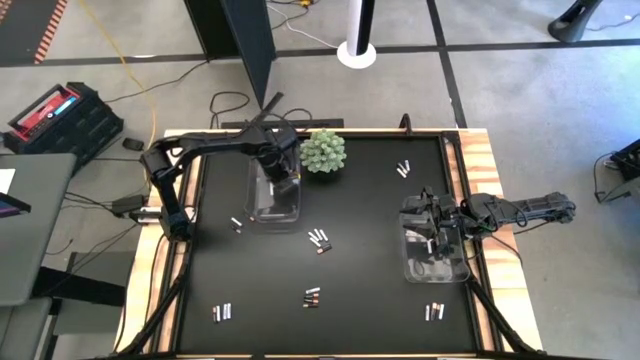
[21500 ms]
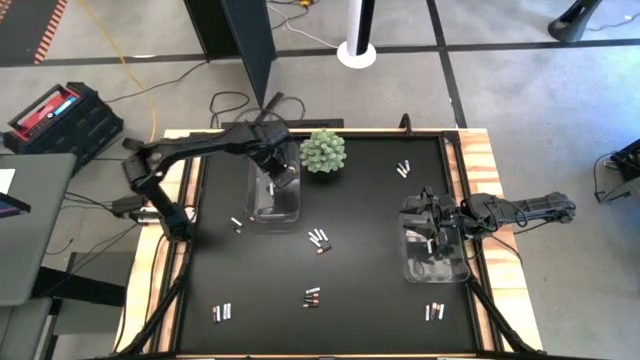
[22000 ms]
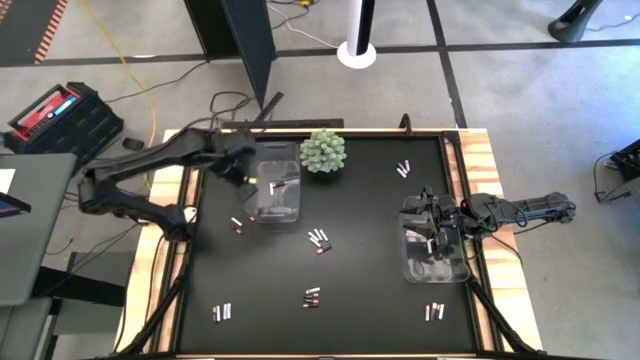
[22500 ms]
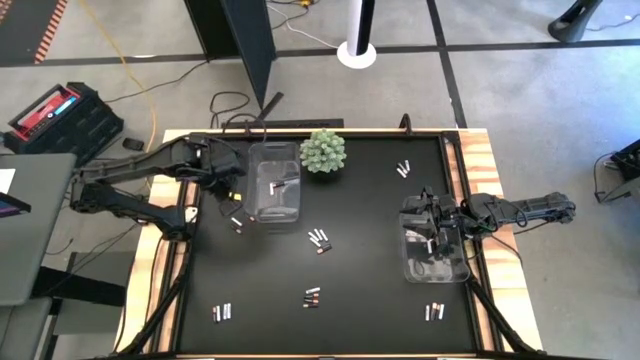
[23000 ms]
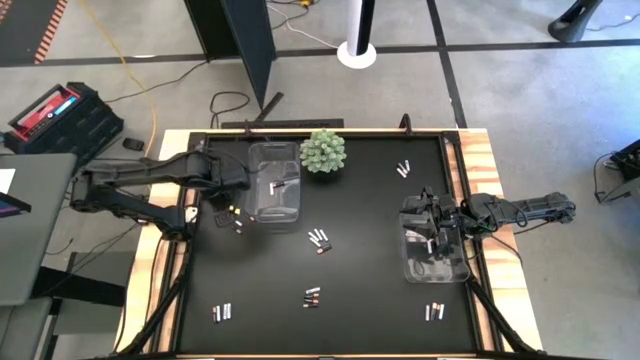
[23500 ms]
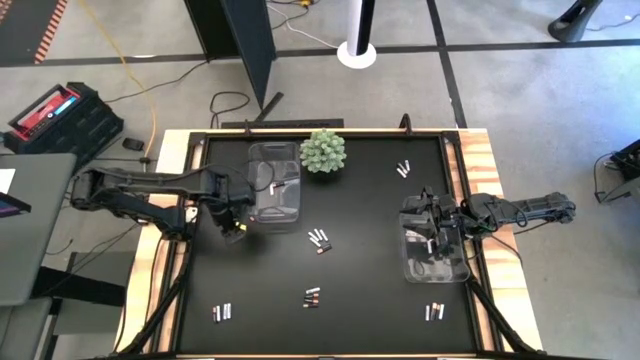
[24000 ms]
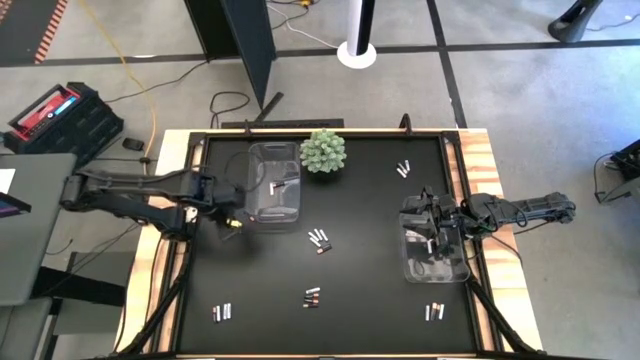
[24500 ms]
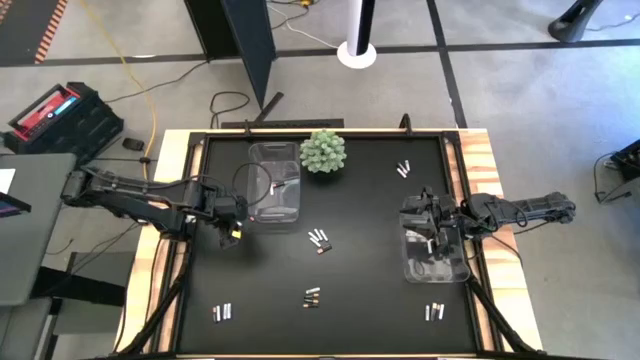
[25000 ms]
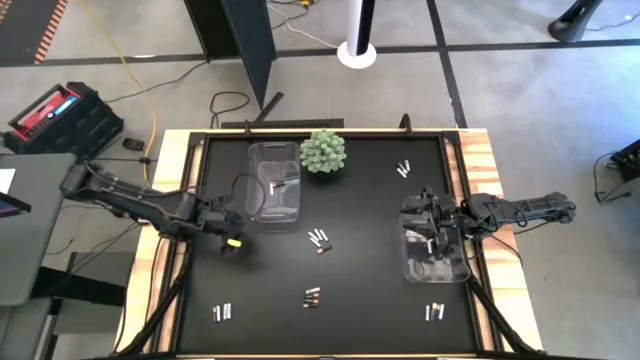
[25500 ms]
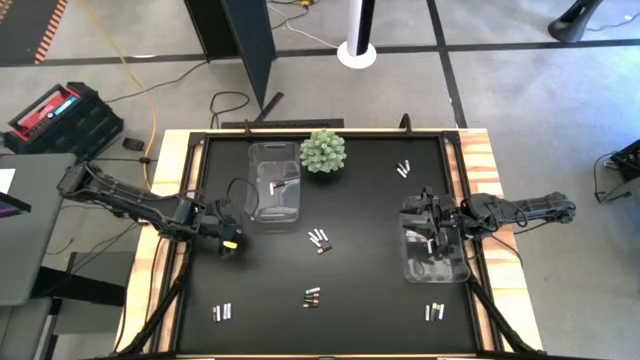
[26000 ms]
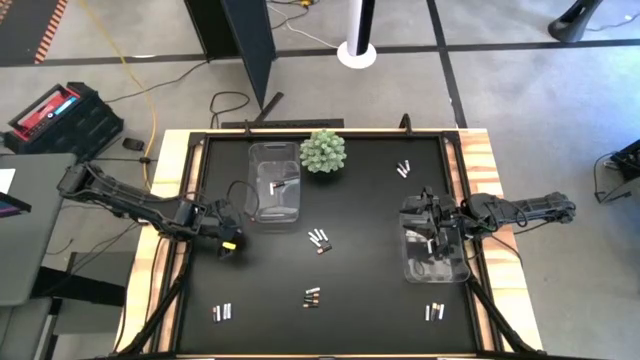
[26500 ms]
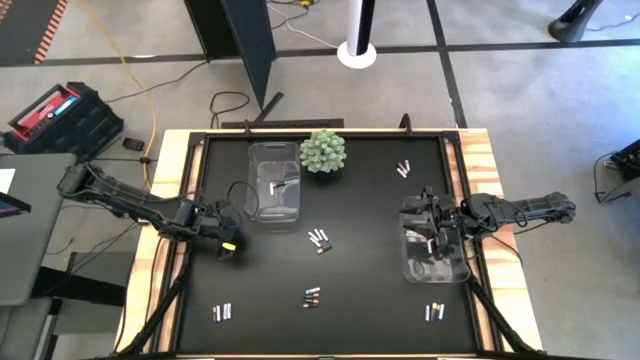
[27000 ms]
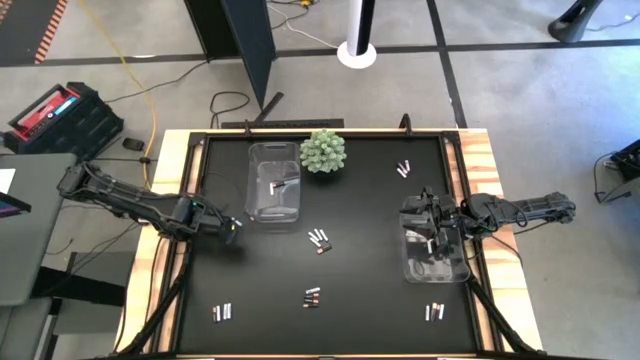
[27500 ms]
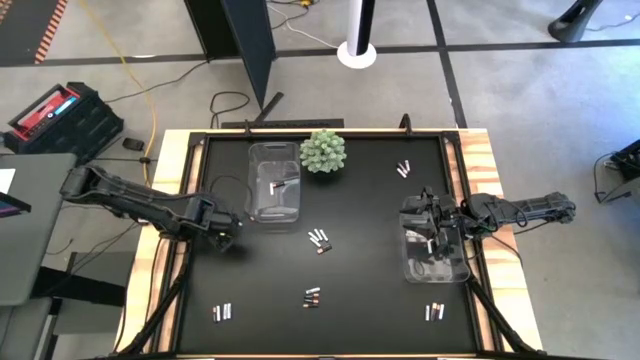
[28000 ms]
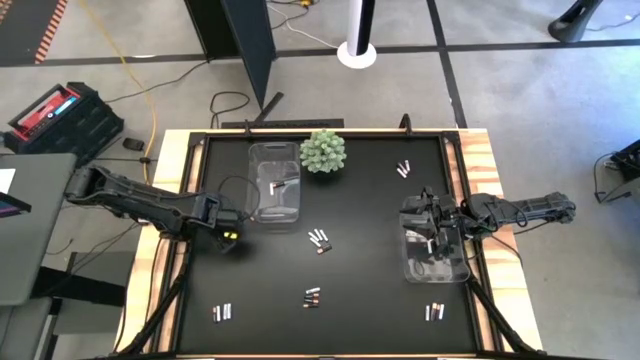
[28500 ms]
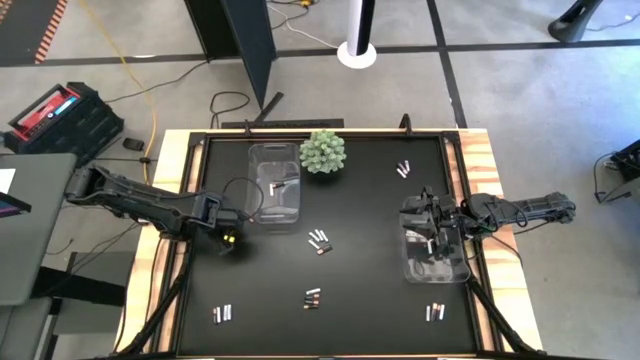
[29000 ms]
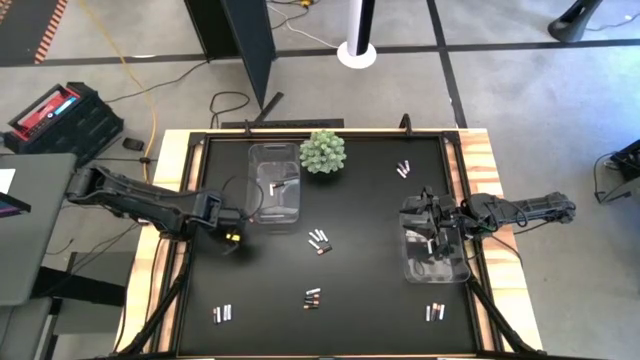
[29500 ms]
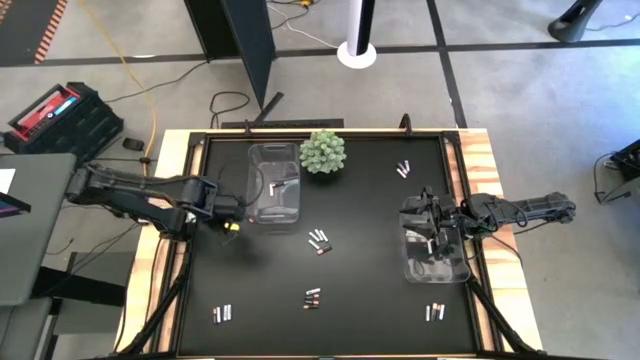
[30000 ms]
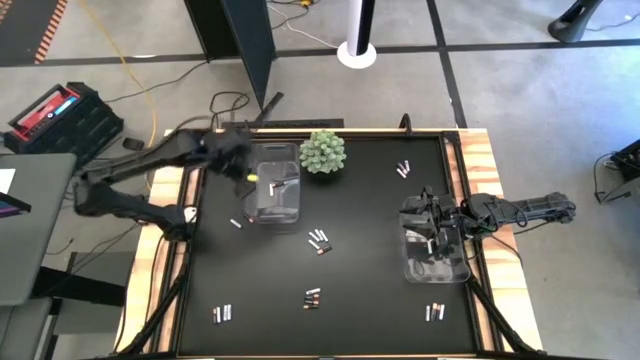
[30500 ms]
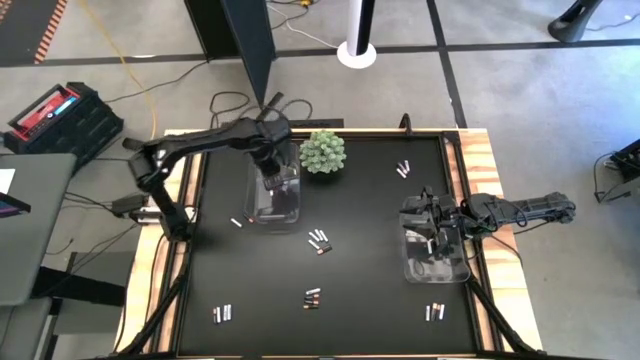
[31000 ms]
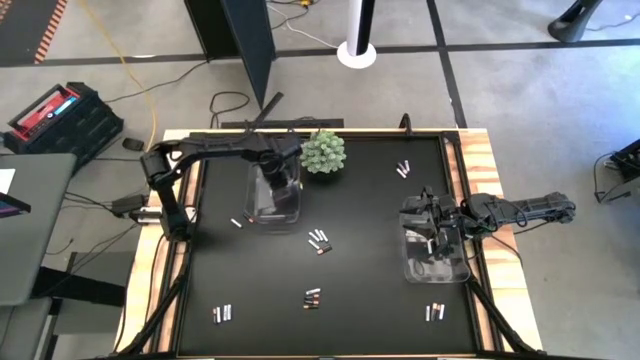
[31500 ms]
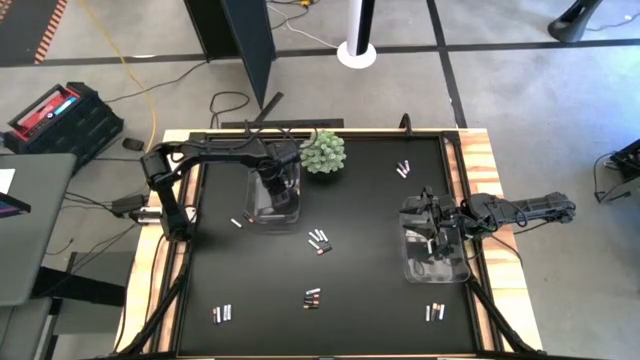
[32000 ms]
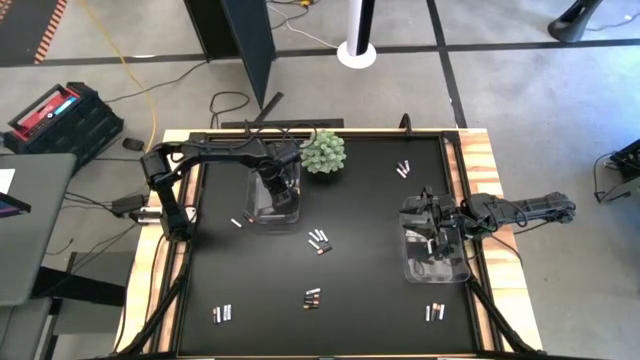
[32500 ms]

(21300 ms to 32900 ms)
Task: Sort batteries
Put the black-brown battery into the left transparent bin

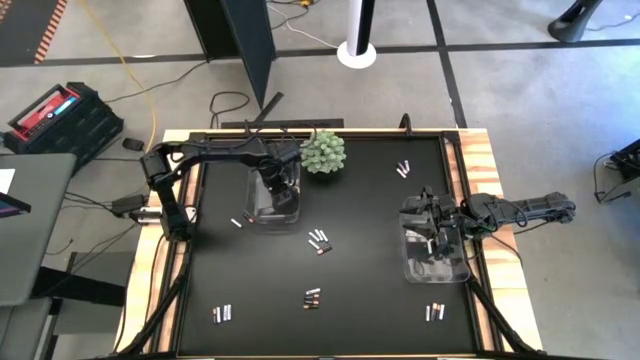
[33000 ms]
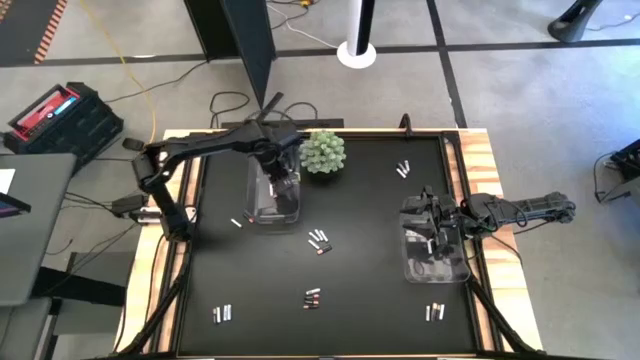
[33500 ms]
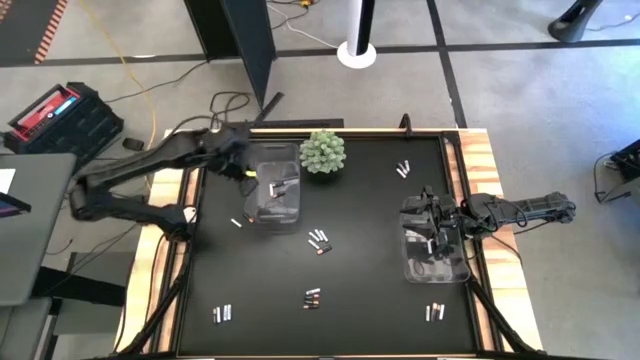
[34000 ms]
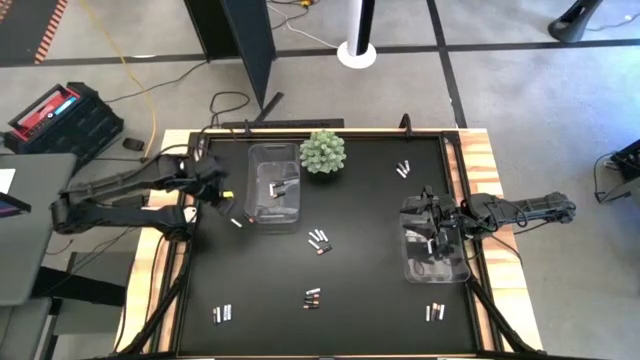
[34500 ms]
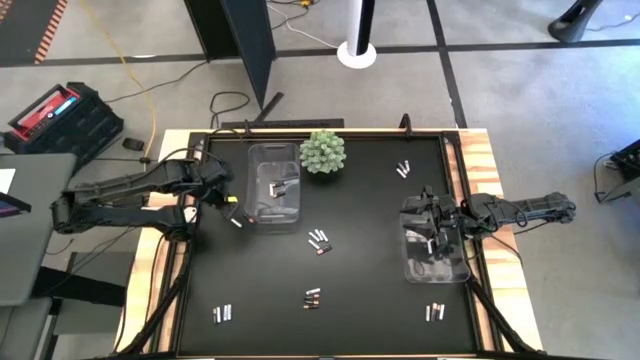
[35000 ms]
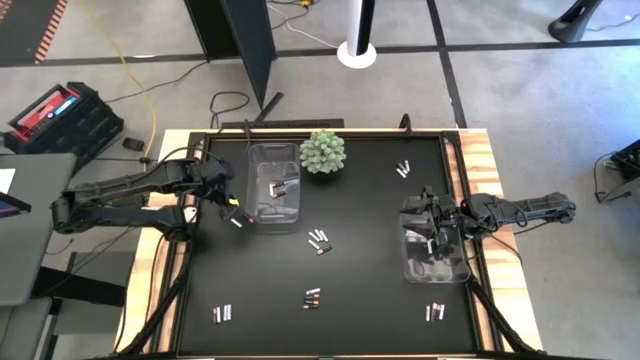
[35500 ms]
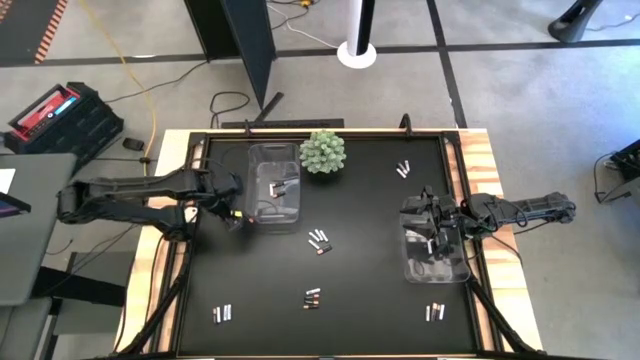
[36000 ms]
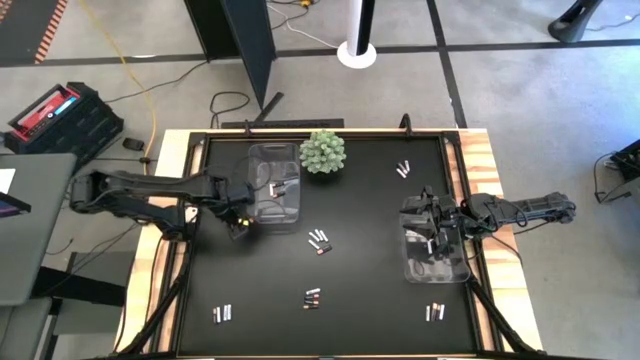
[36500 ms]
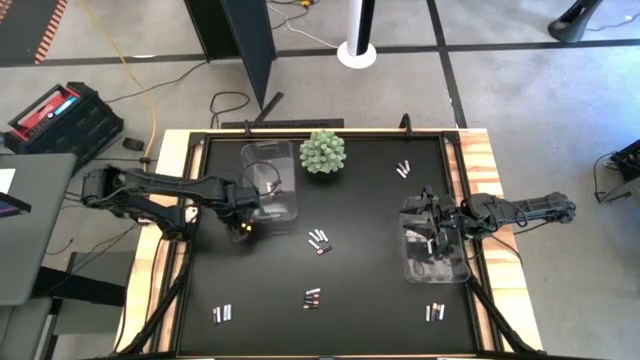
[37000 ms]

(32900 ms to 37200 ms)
Put the white-blue battery into the right transparent bin

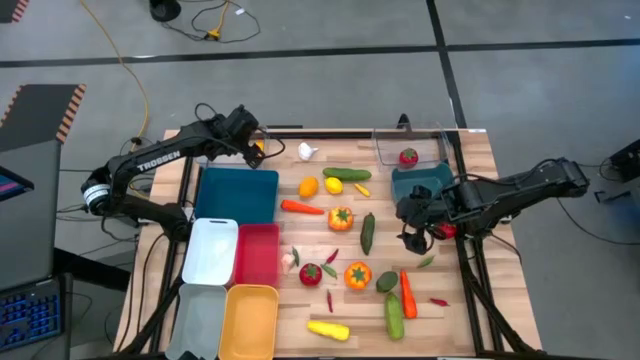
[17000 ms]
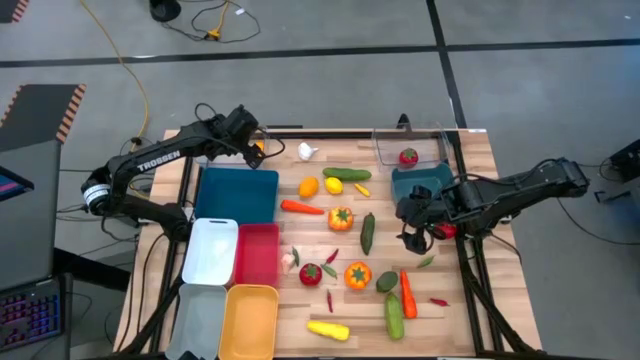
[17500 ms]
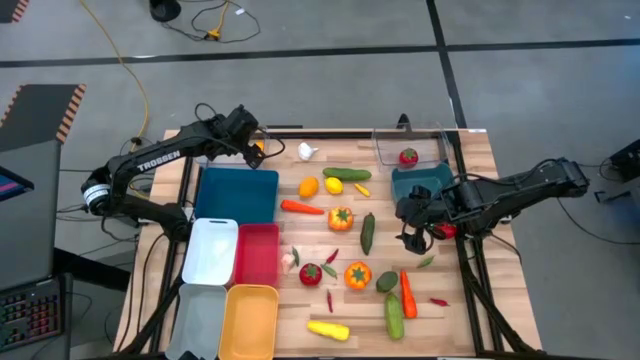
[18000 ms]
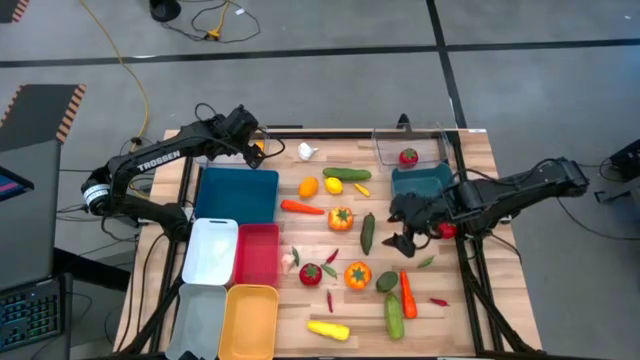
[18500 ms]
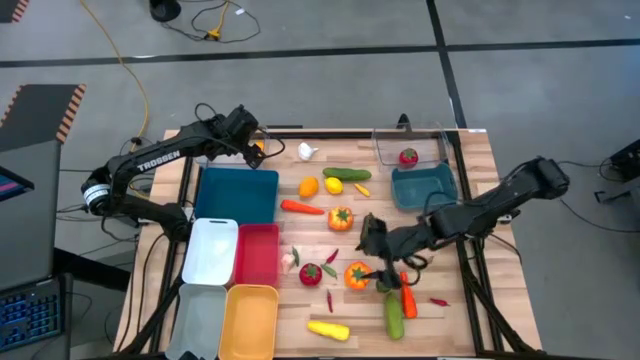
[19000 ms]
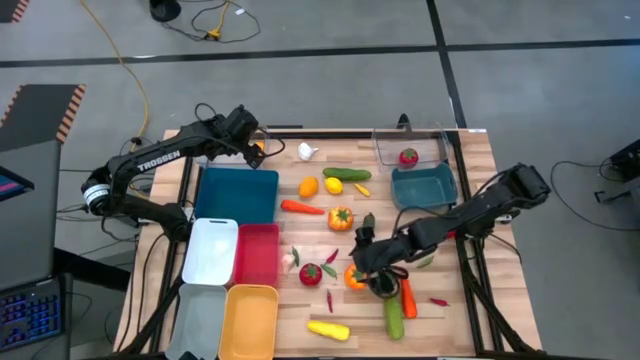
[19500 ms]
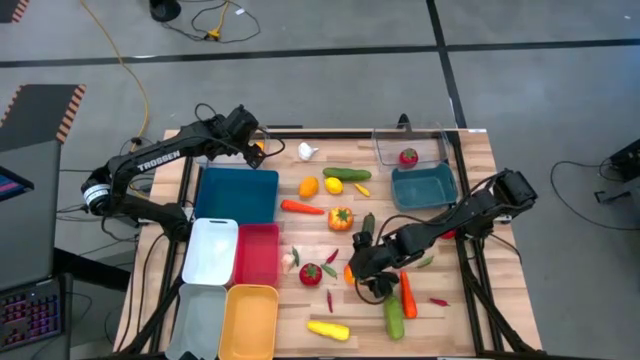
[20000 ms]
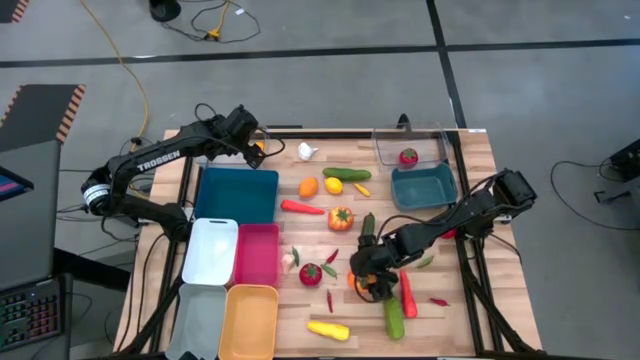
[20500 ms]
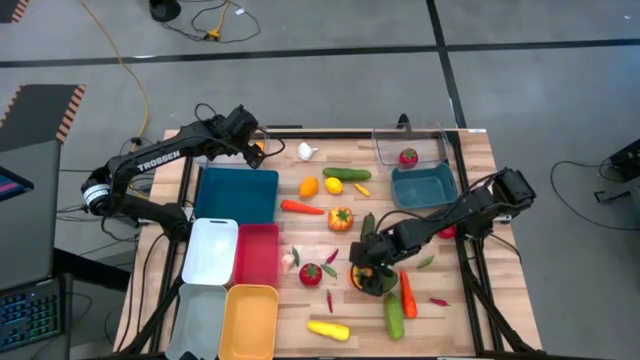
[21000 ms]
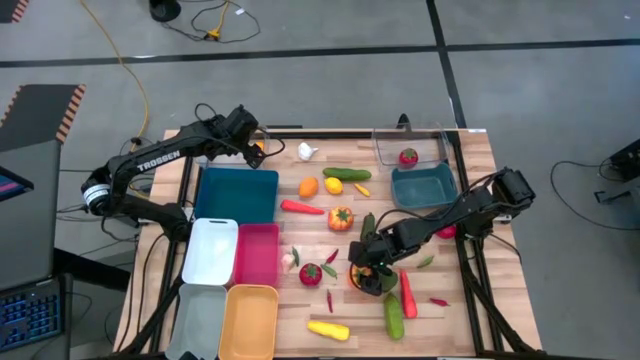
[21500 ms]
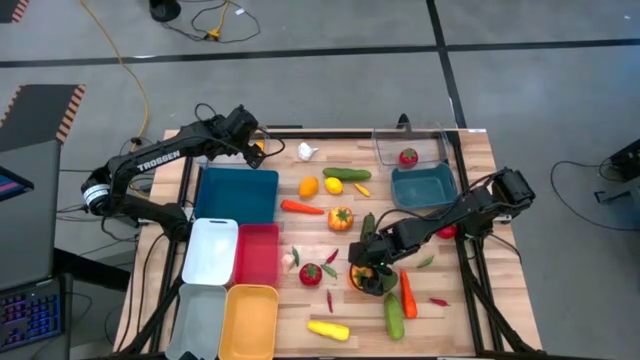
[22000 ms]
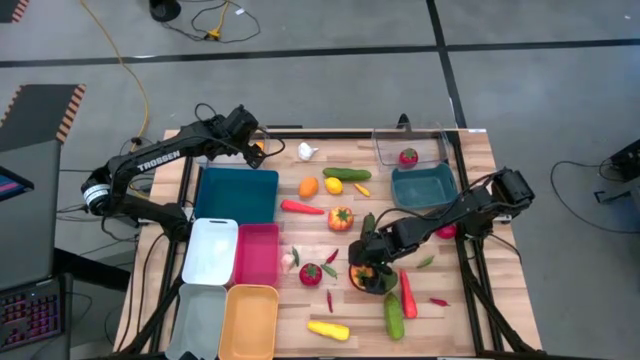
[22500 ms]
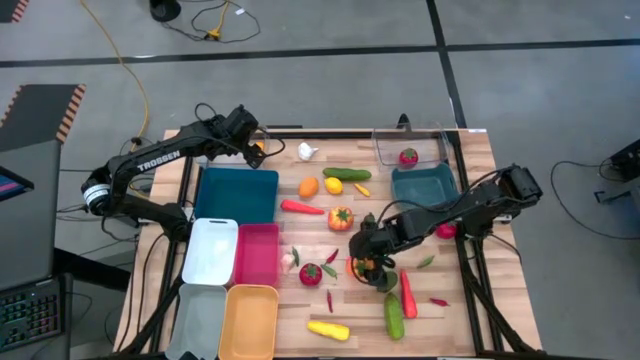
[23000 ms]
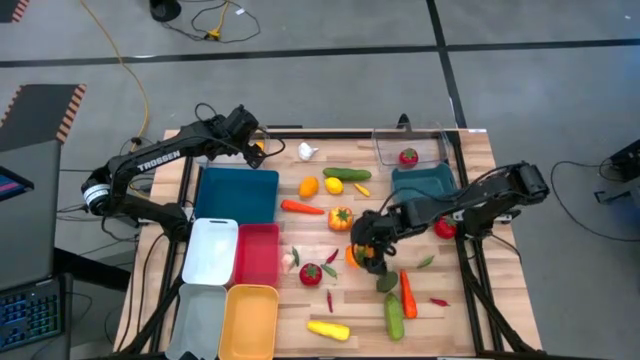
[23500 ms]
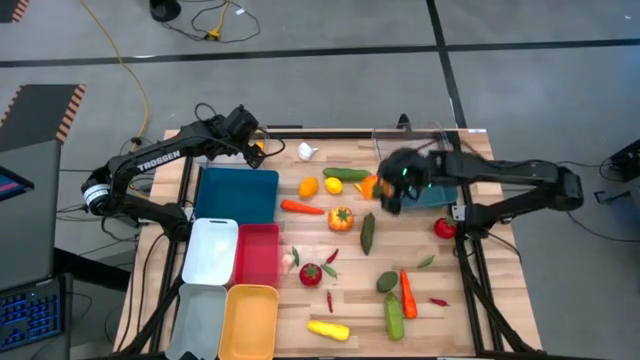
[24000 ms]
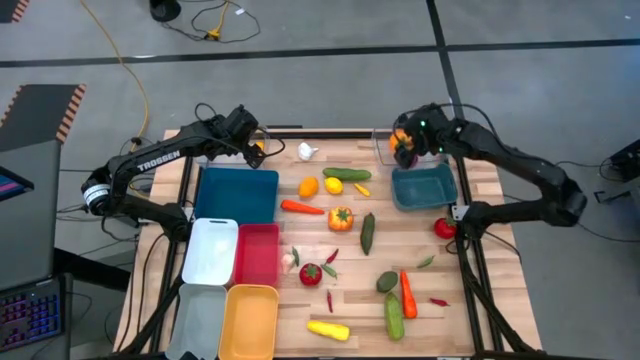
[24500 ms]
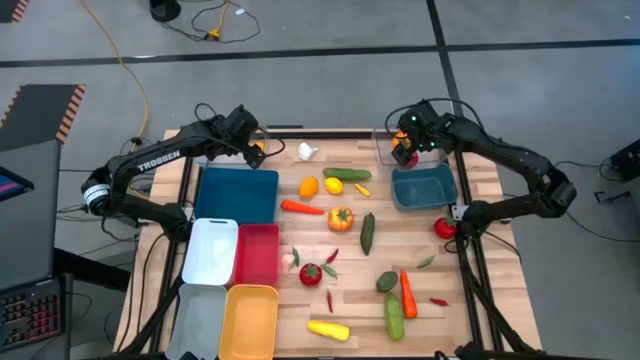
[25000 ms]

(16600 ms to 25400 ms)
Task: Sort produce into baskets
Put the bottom orange tomato into the right transparent bin
